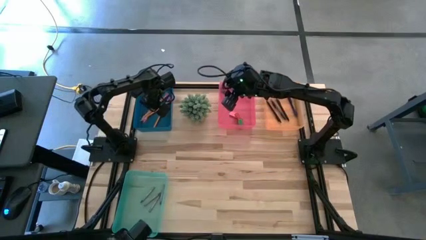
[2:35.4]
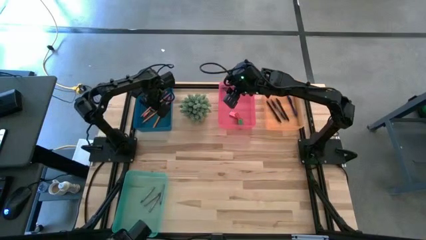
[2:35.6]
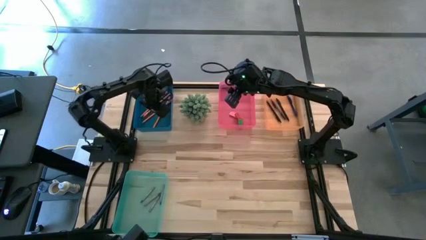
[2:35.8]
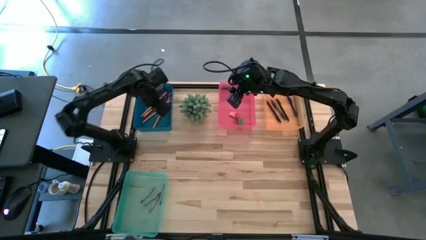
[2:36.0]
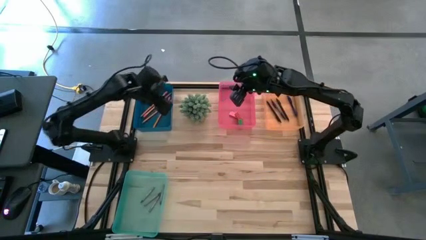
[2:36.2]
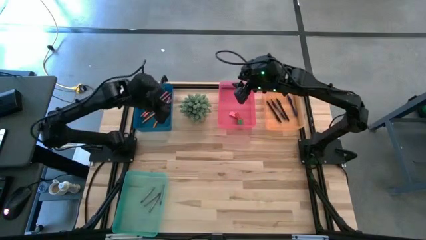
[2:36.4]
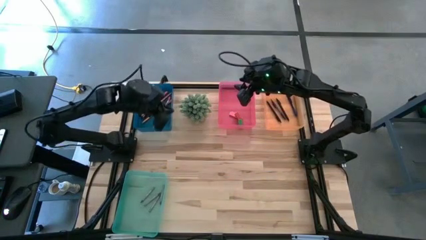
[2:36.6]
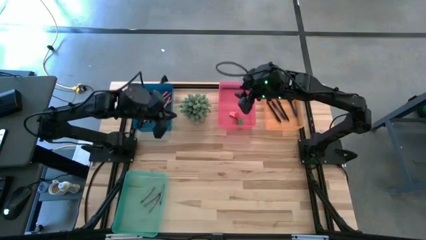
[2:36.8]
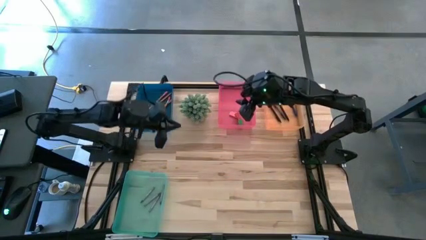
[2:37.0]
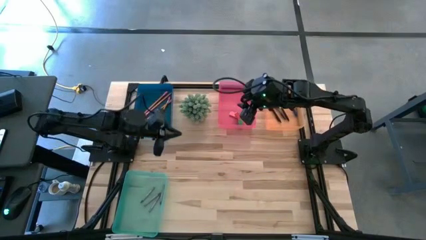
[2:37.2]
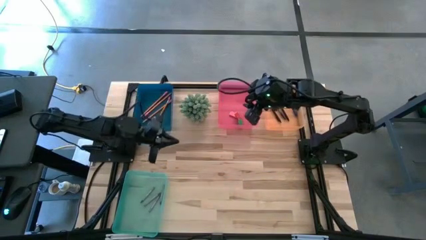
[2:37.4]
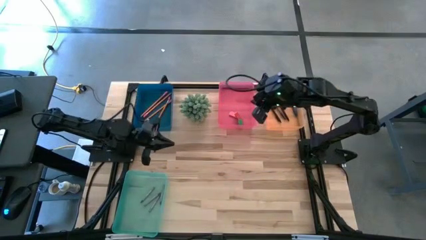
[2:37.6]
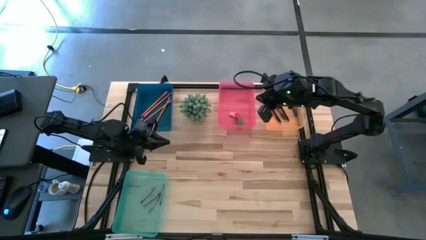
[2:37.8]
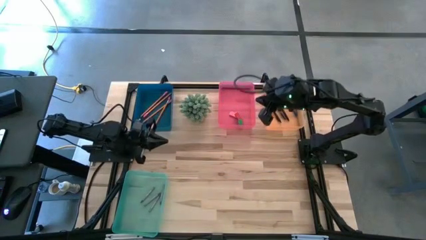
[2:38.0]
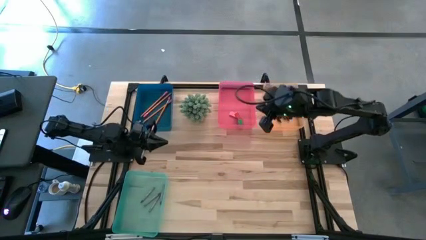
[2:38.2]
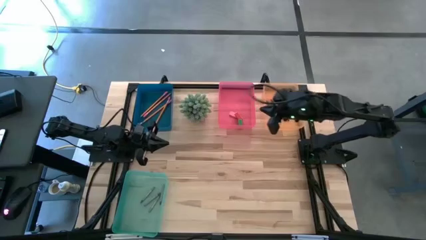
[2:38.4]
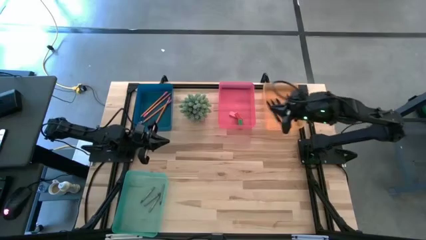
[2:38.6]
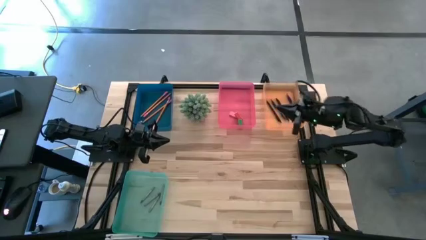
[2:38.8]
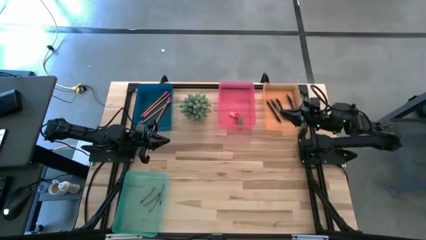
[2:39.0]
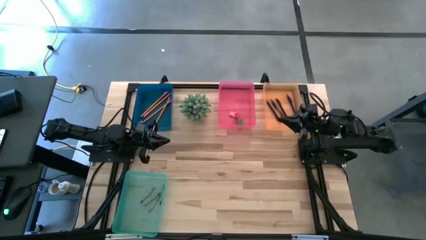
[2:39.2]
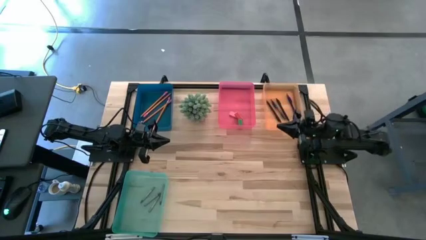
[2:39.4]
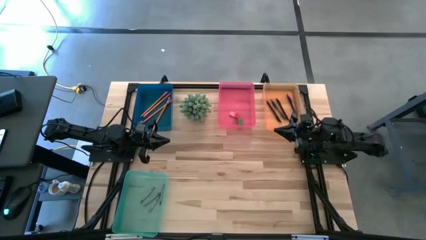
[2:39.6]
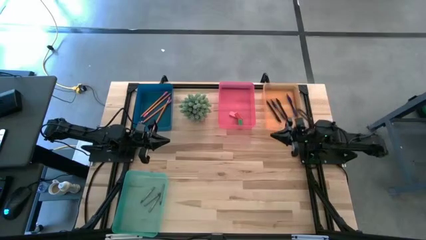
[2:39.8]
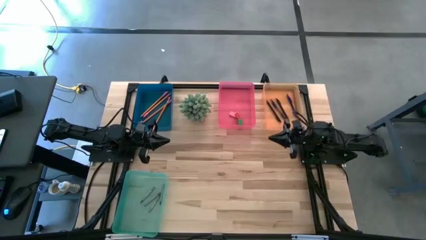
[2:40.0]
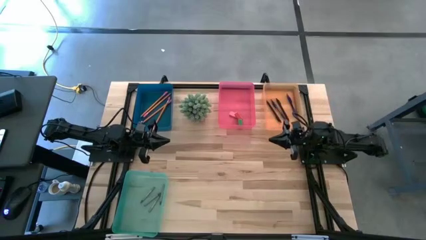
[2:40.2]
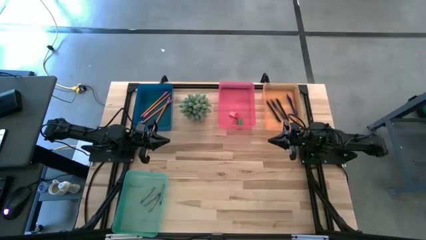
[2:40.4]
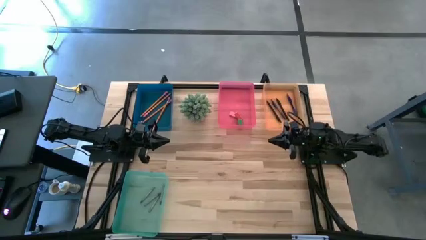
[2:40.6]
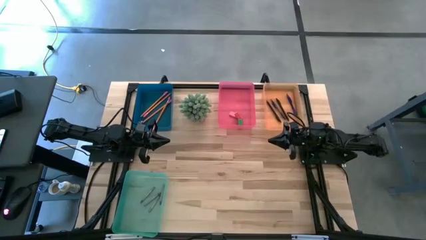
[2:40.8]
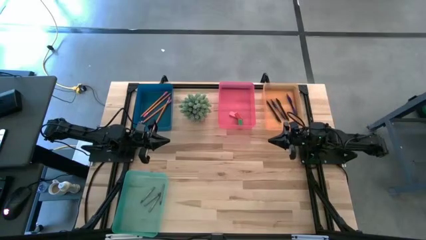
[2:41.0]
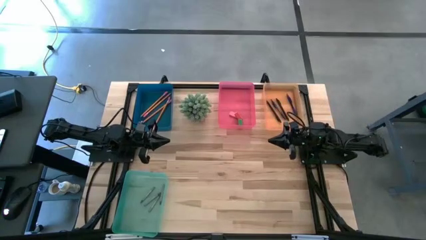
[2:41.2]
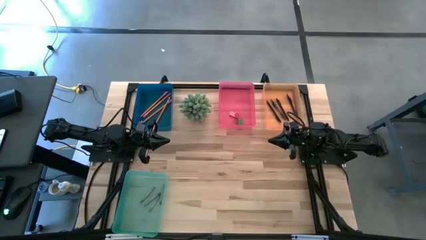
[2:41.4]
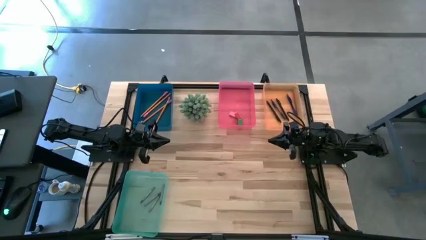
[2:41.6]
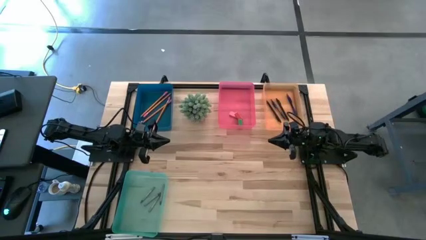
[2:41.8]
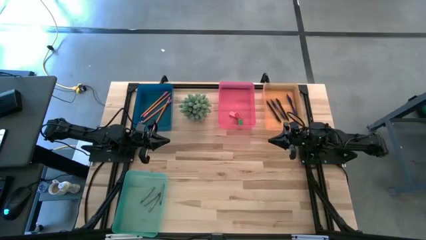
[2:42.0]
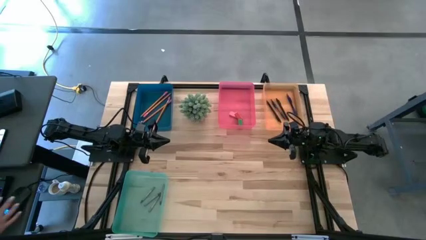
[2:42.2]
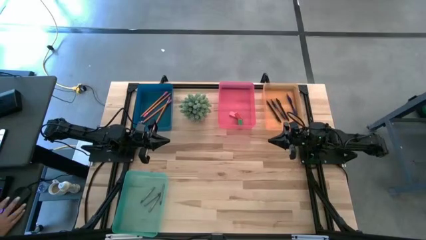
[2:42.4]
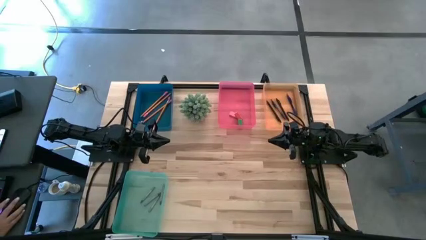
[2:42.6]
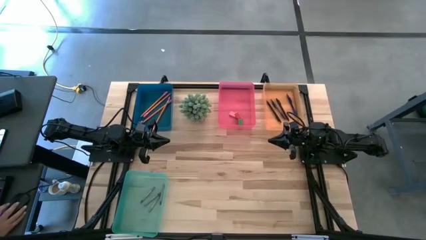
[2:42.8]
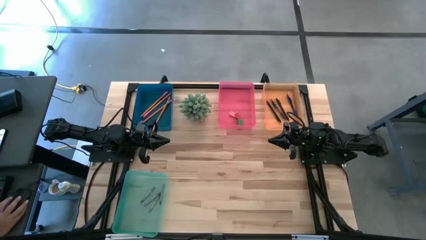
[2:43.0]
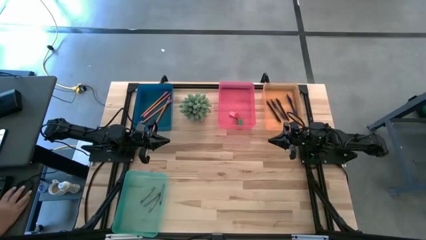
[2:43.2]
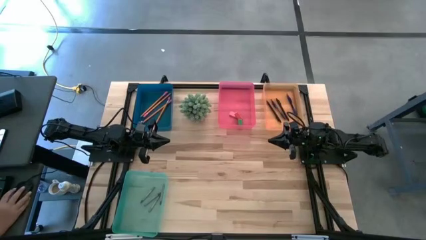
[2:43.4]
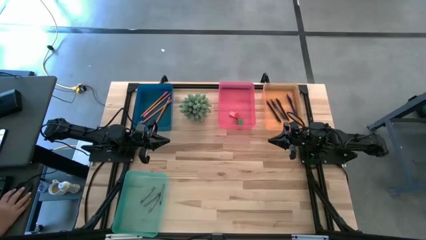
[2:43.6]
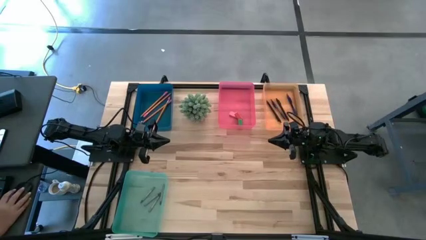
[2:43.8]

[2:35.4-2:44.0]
Task: Sort crayons/erasers/pens/pencils in bins
Return to Home Position
